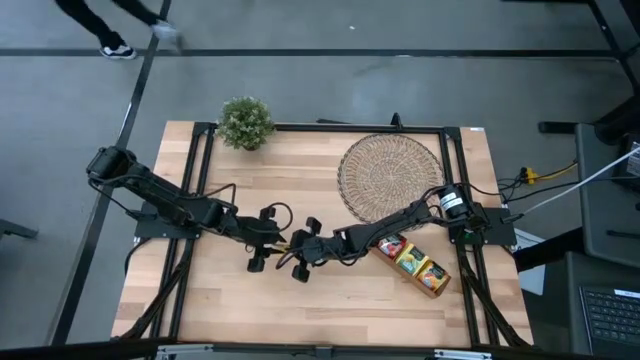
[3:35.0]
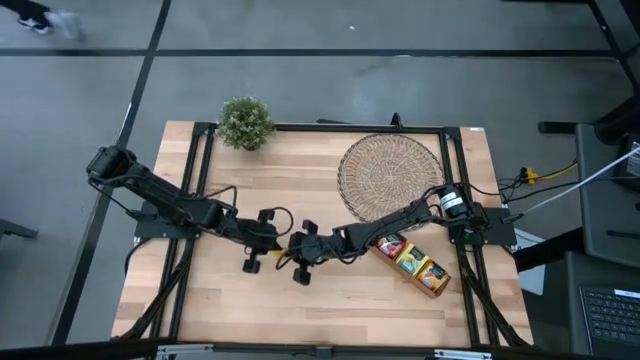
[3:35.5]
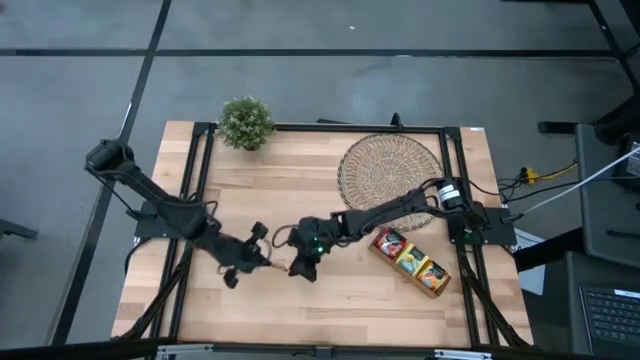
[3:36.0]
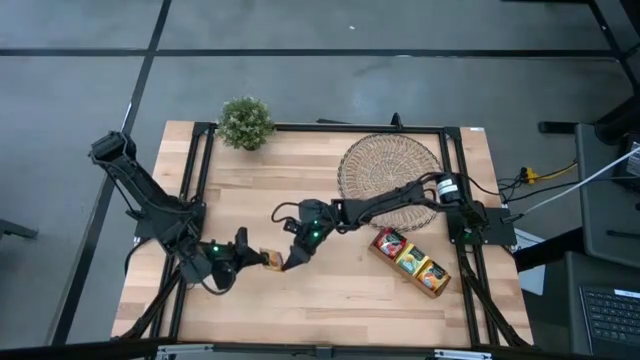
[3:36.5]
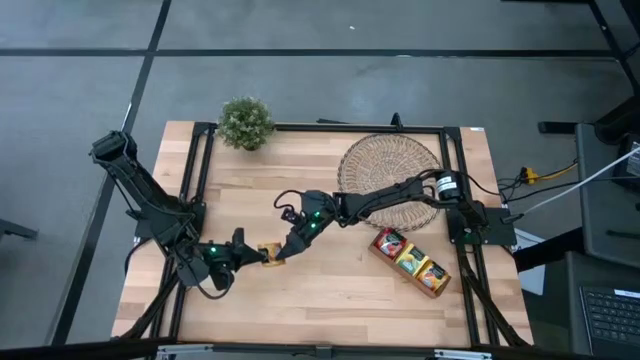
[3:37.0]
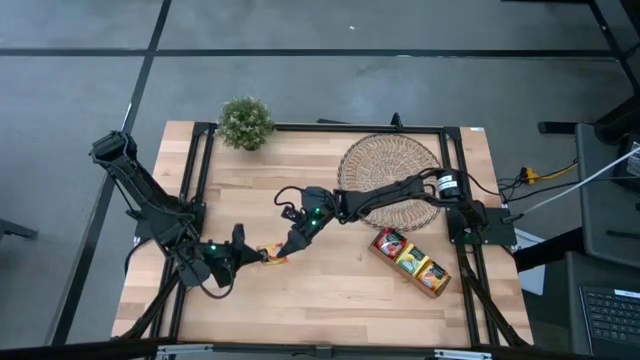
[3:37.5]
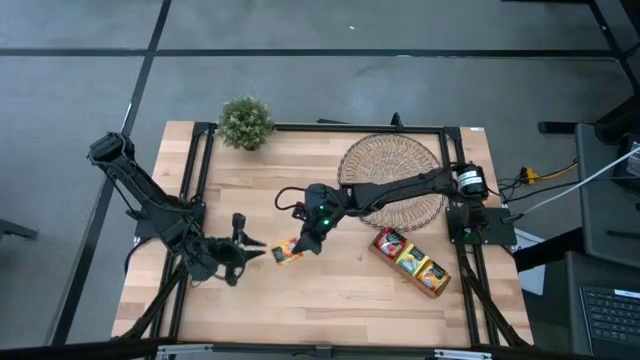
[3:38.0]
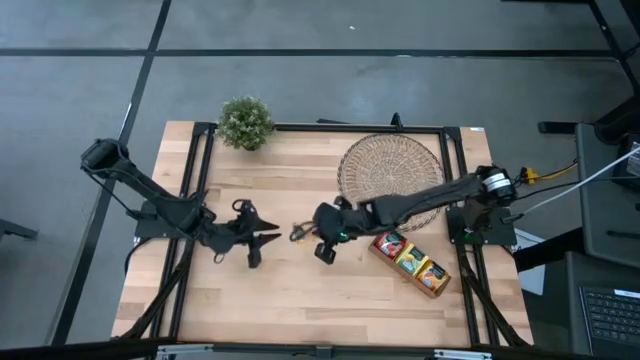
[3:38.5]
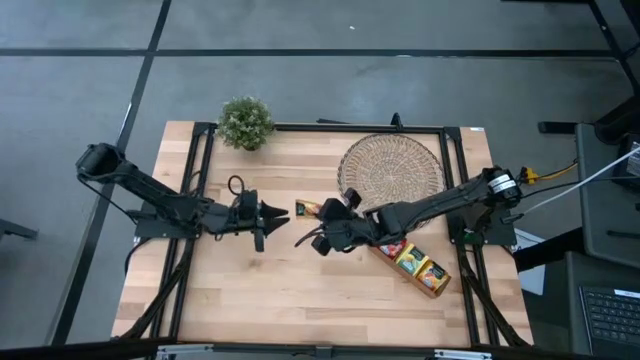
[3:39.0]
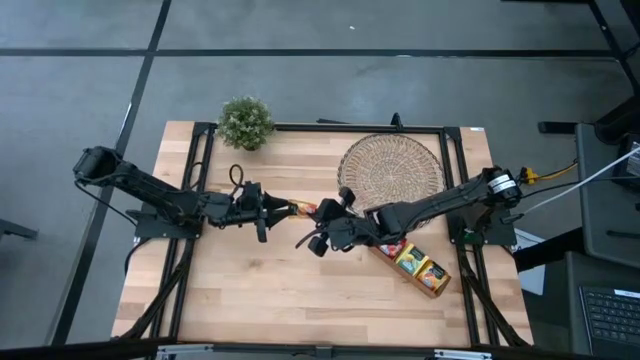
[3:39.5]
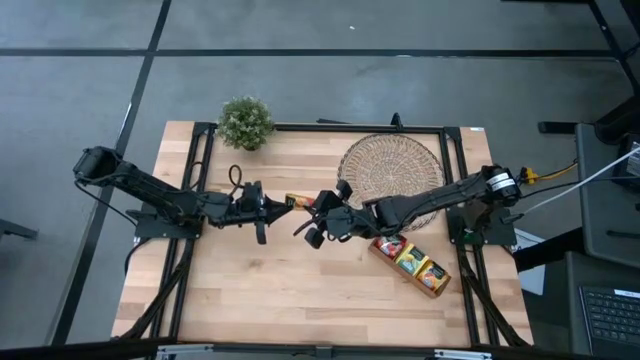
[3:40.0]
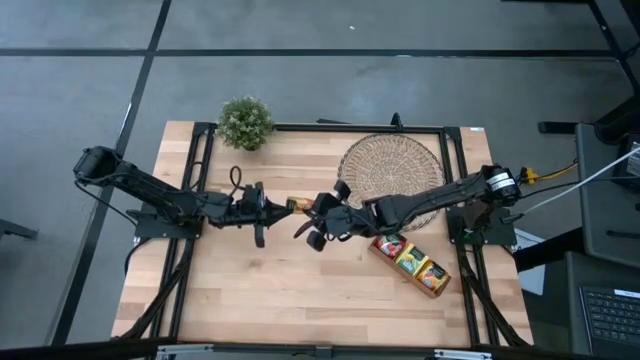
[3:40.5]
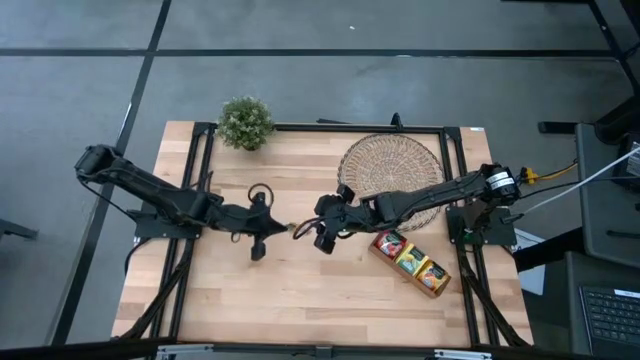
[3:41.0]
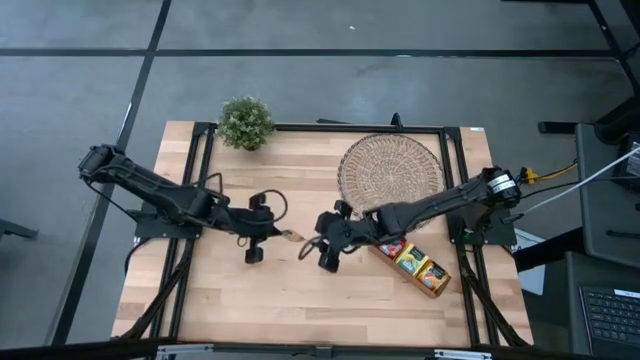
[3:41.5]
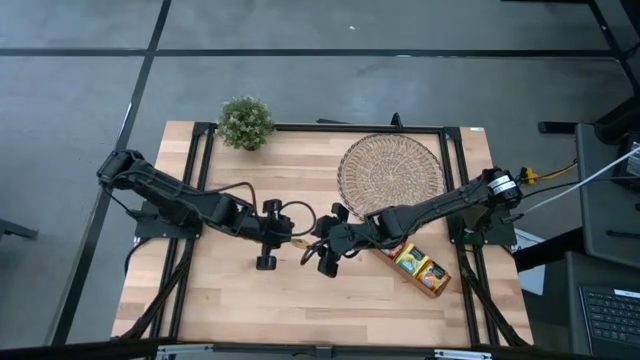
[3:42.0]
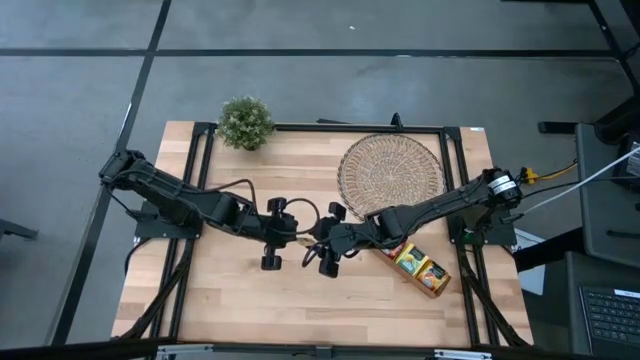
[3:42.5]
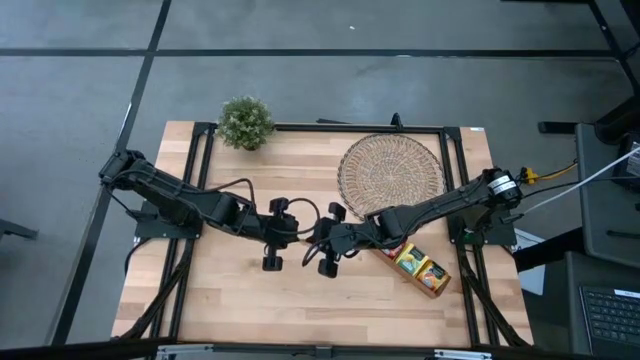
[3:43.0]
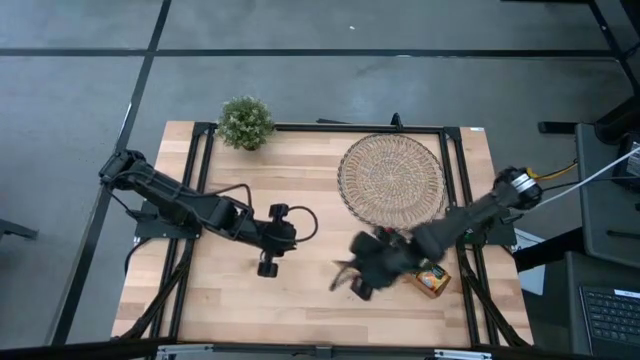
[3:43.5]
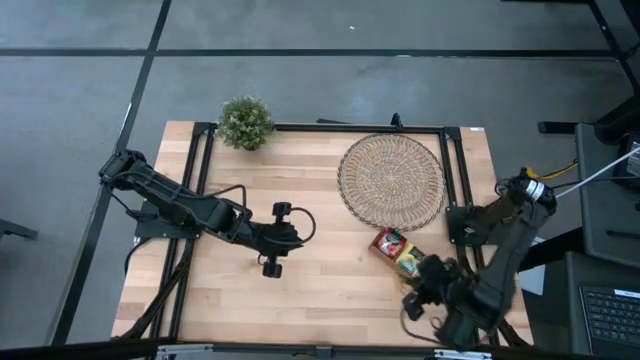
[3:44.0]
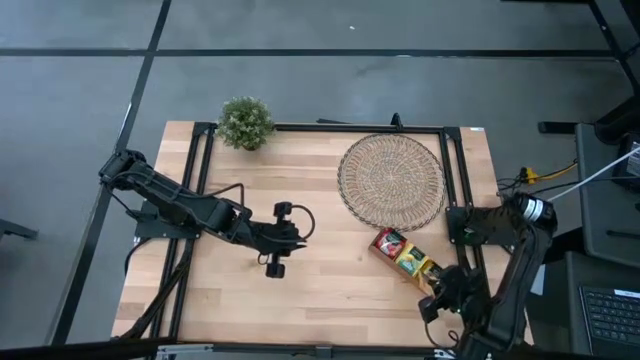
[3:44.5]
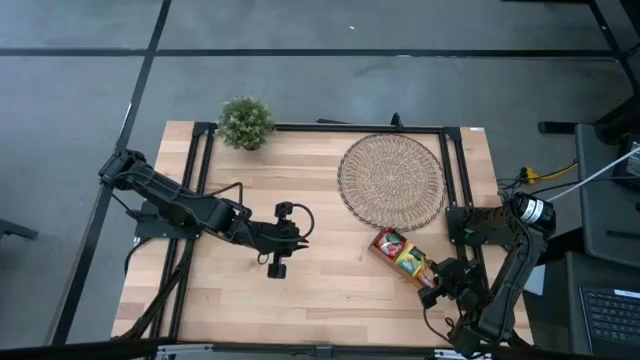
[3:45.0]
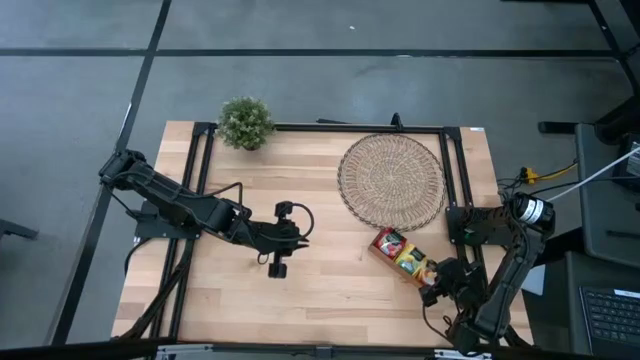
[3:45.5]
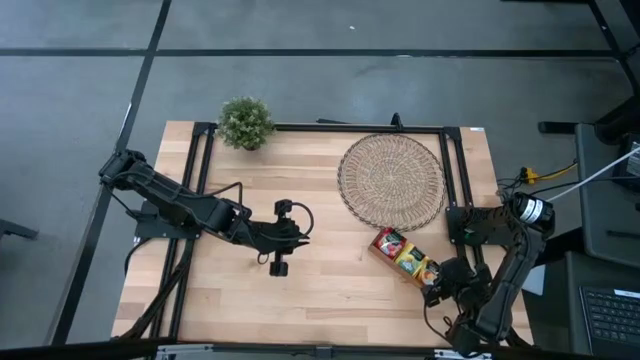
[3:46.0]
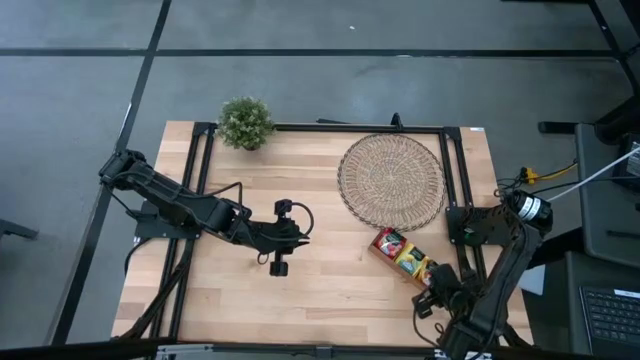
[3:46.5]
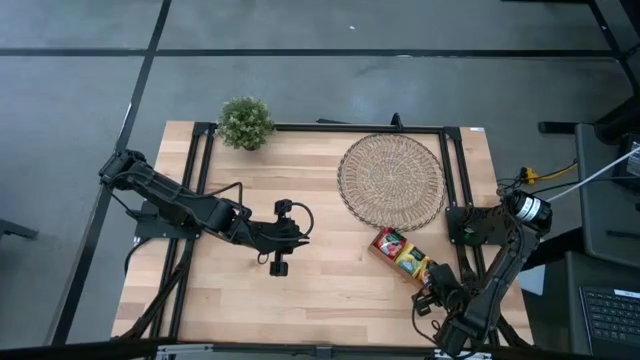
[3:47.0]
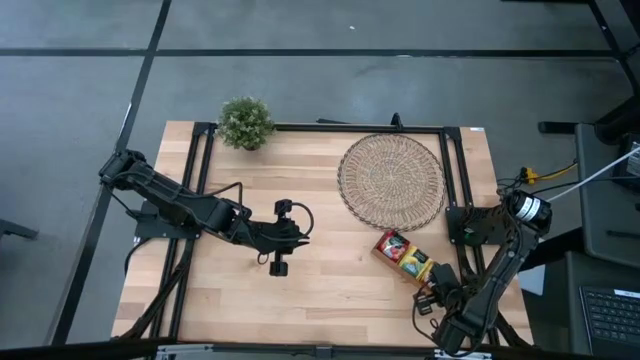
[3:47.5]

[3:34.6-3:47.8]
Task: Pick & Place Tea
Put the orange tea bag into the right slot of the wooden organizer

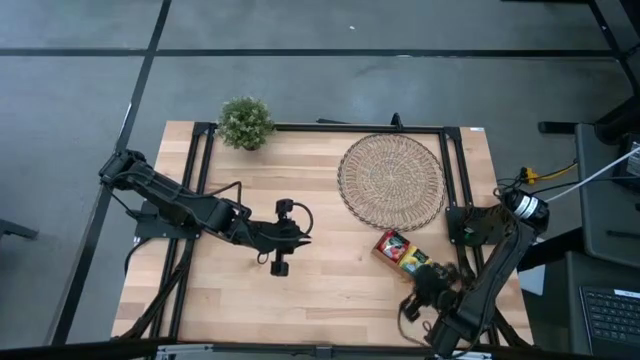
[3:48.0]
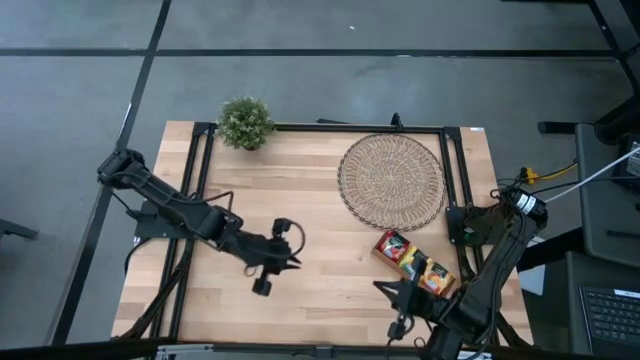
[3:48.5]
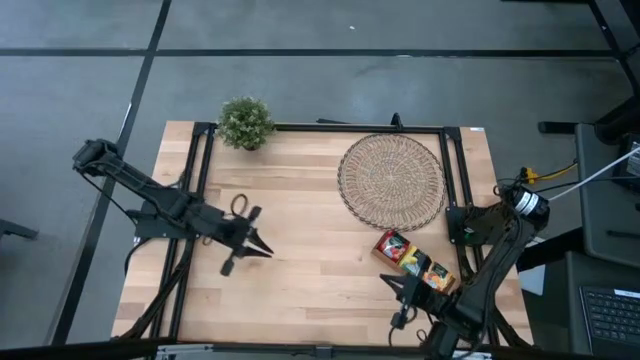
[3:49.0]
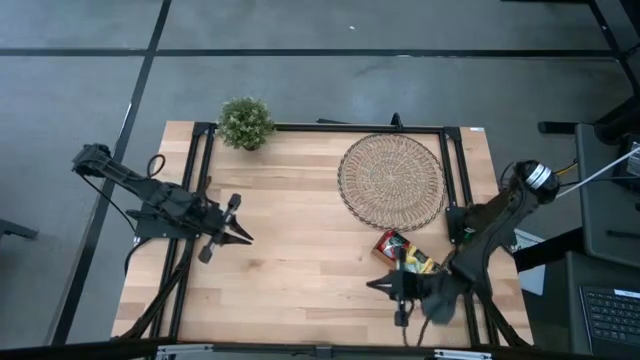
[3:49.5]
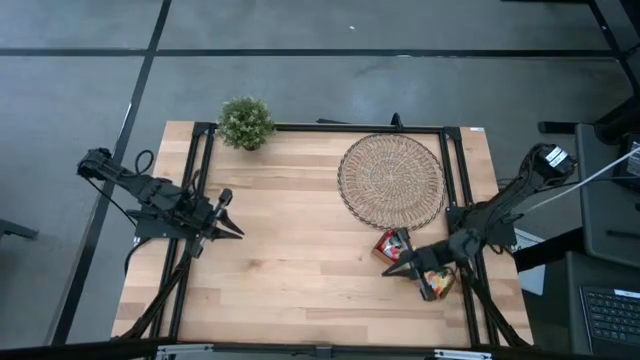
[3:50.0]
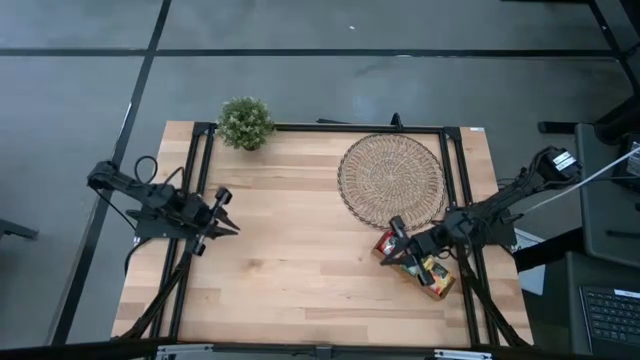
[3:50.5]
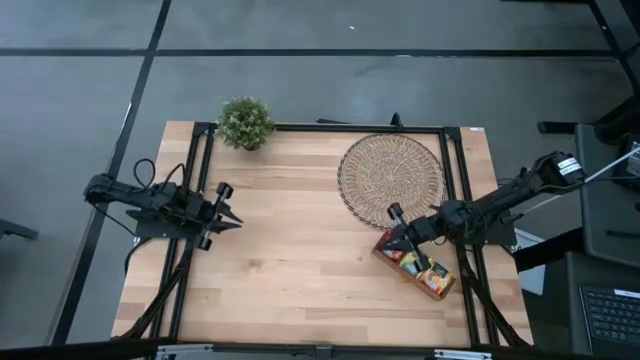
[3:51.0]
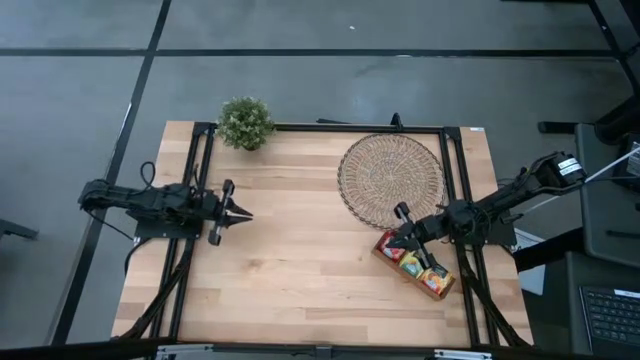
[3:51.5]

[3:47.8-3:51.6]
Return to Home Position

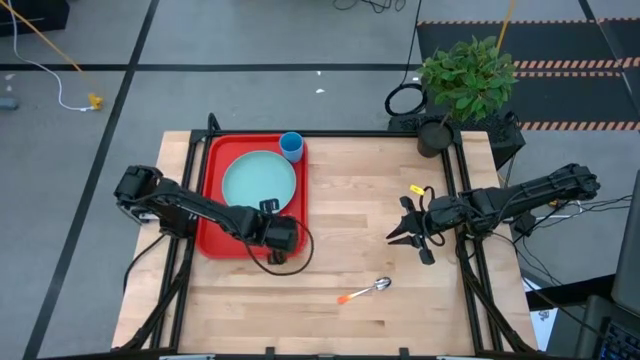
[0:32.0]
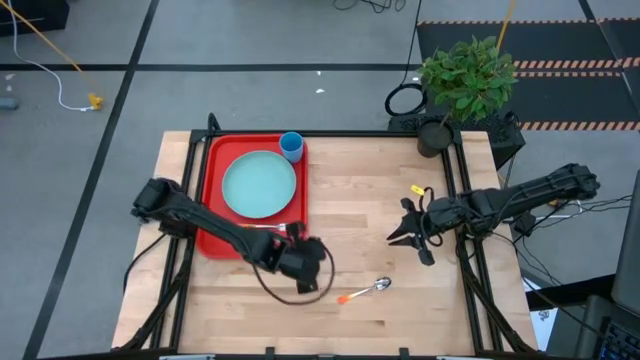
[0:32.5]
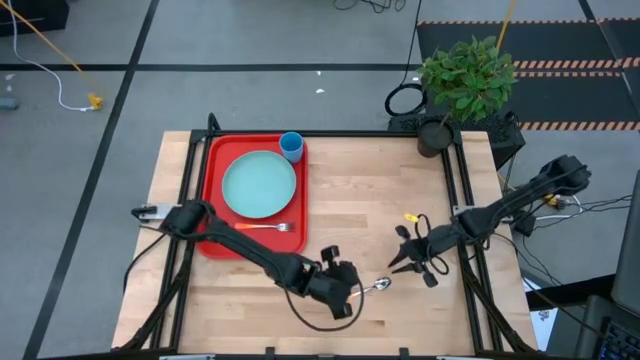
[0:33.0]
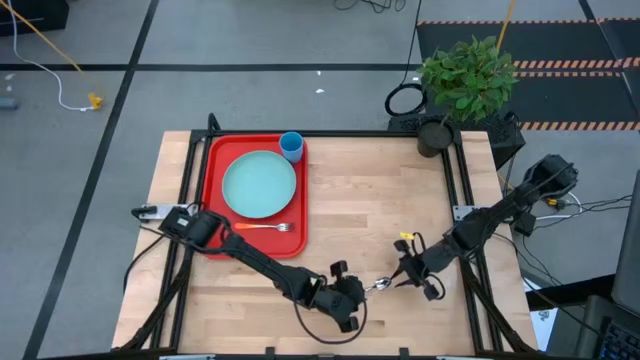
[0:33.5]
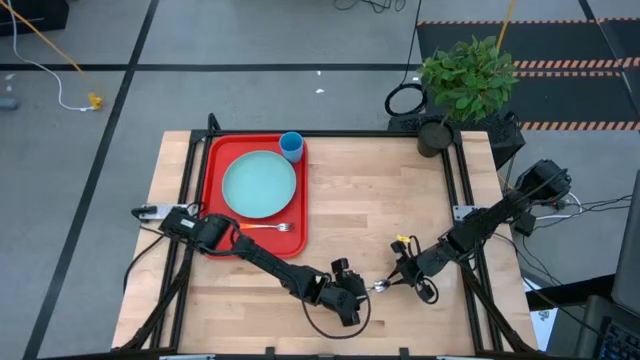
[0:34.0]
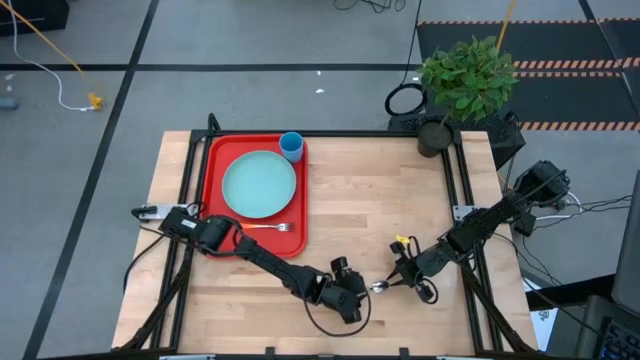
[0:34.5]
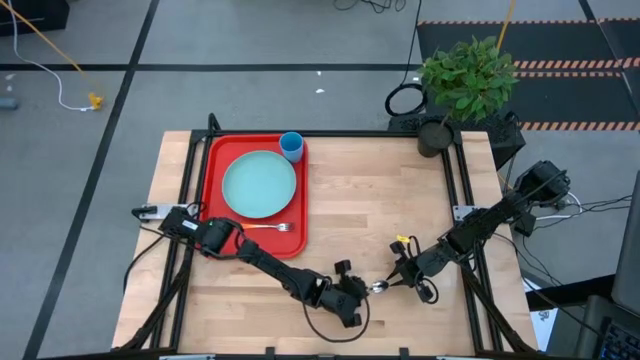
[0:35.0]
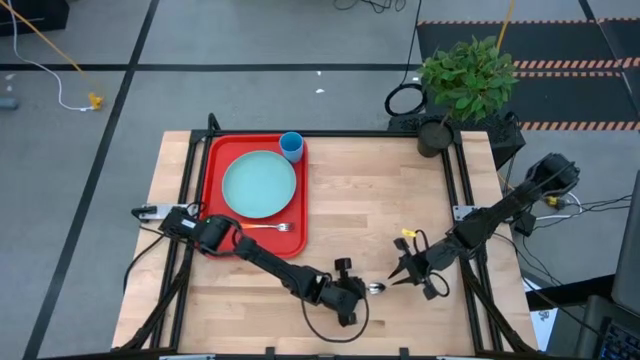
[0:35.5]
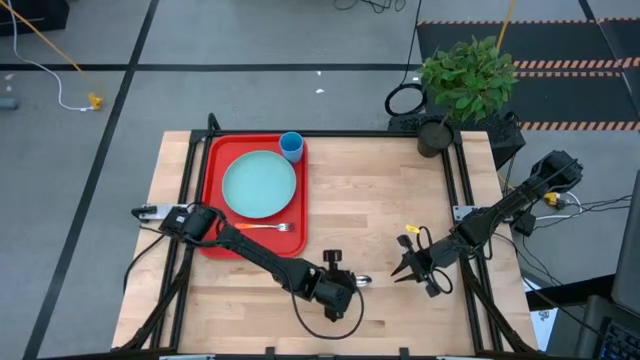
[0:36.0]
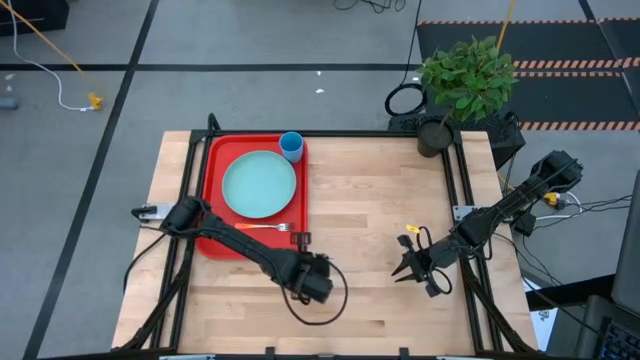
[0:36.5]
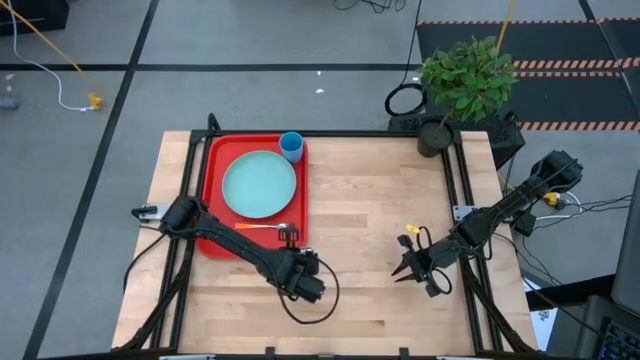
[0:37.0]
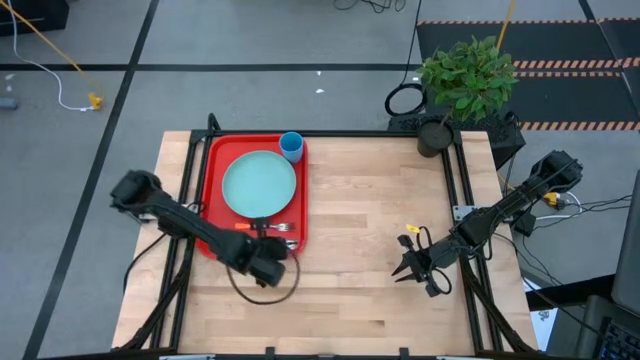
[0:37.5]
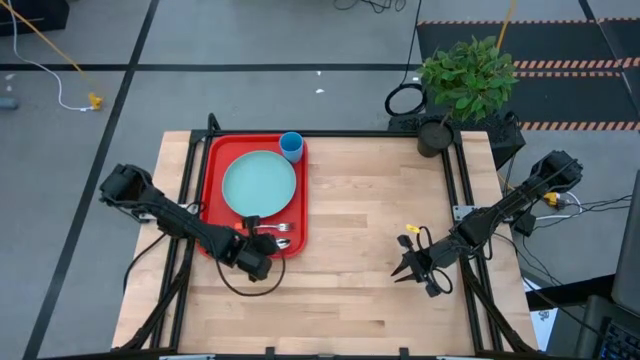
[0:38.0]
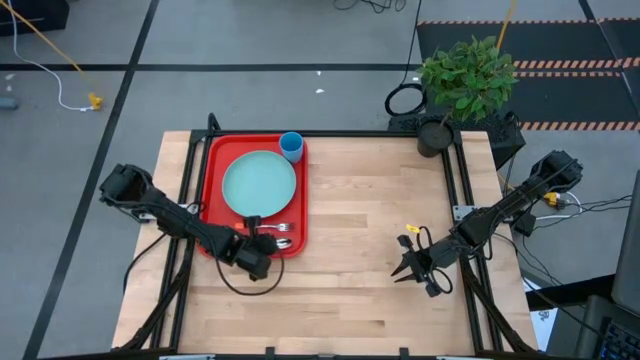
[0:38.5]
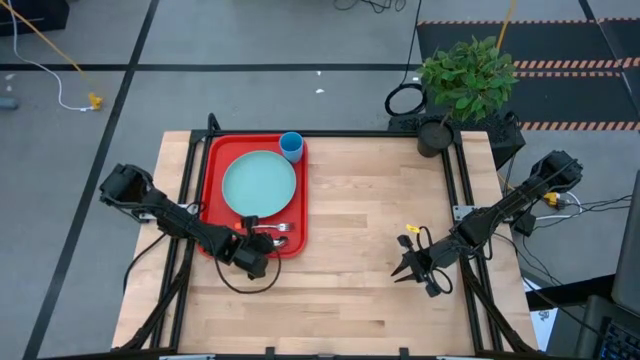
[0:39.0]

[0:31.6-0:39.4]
Task: Pick and place plate/cup/fork/spoon on tray
Put the orange spoon on the red serving tray to the right of the orange fork
